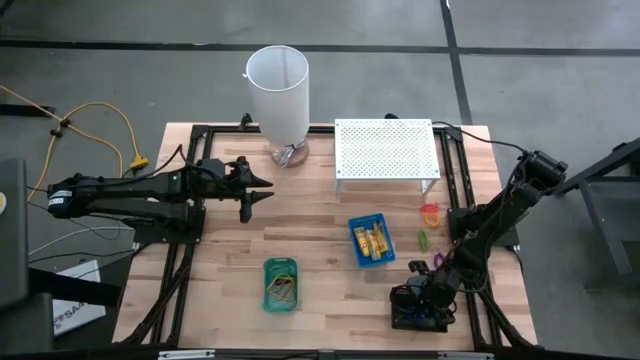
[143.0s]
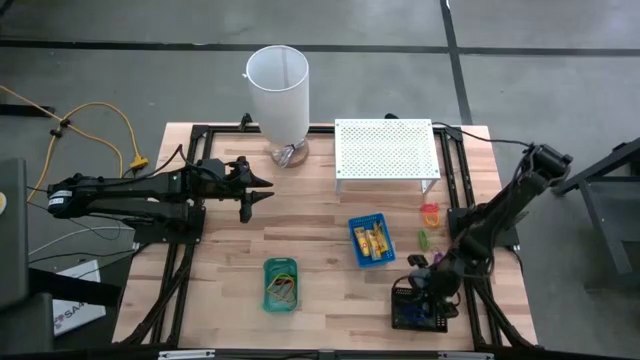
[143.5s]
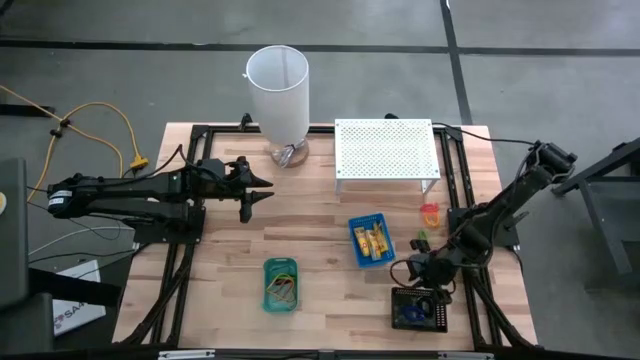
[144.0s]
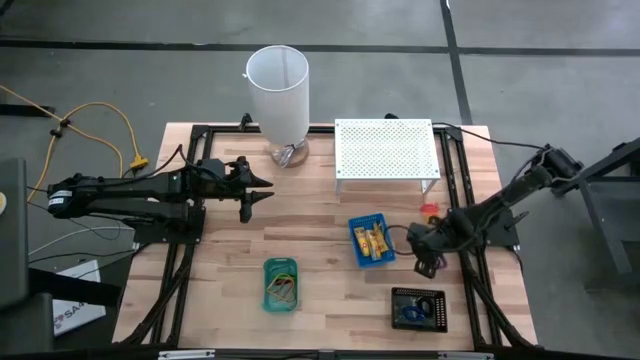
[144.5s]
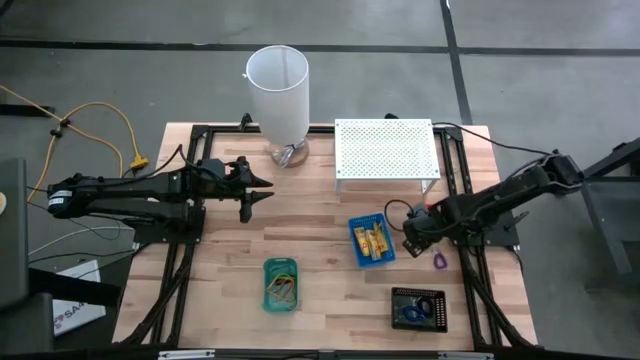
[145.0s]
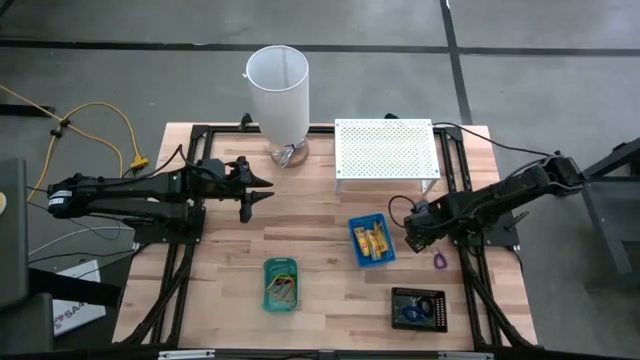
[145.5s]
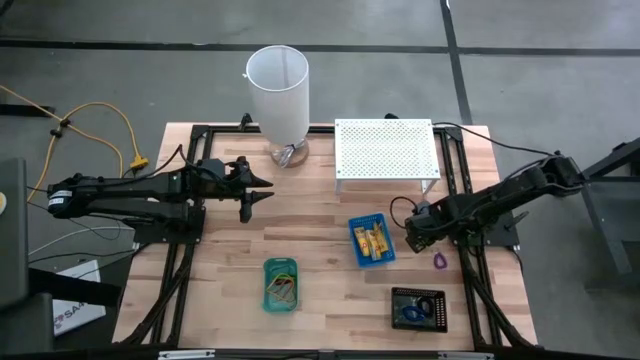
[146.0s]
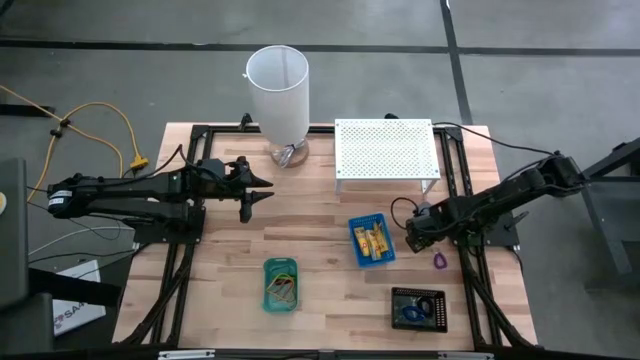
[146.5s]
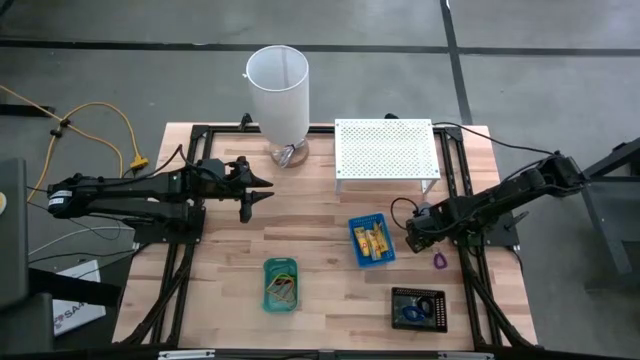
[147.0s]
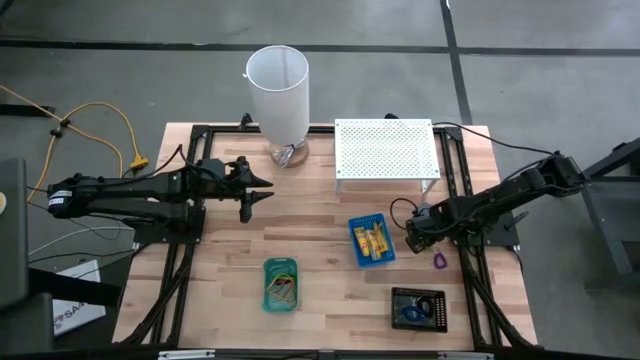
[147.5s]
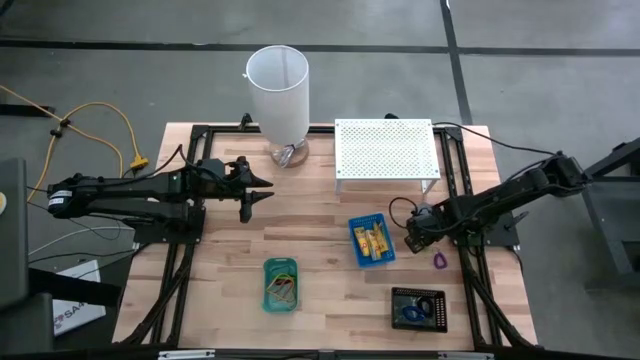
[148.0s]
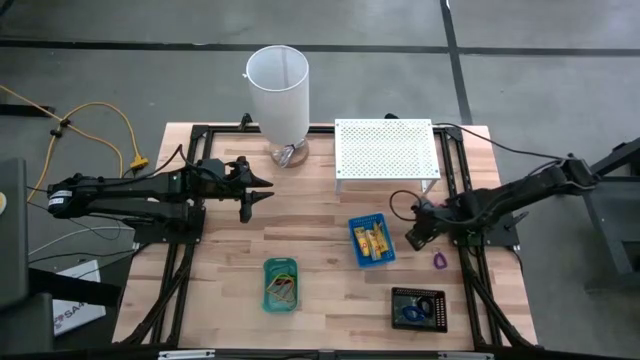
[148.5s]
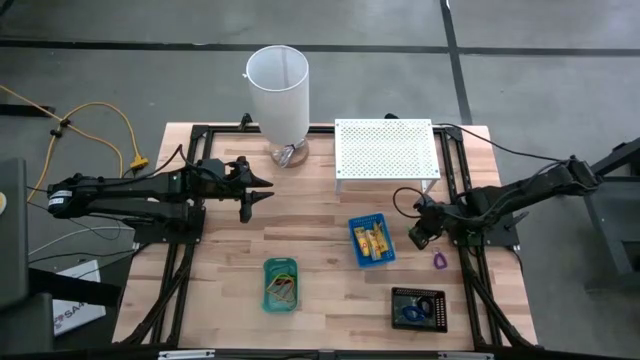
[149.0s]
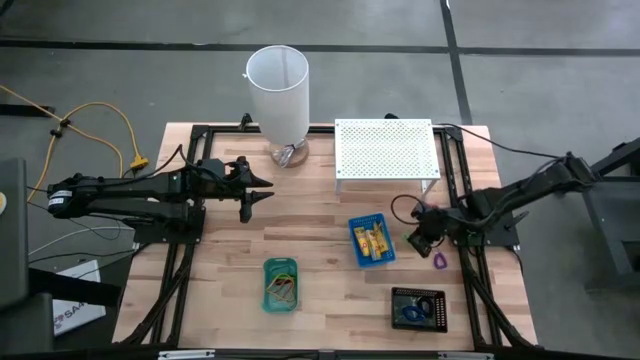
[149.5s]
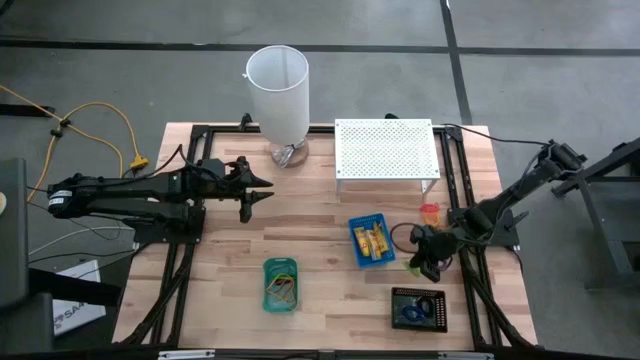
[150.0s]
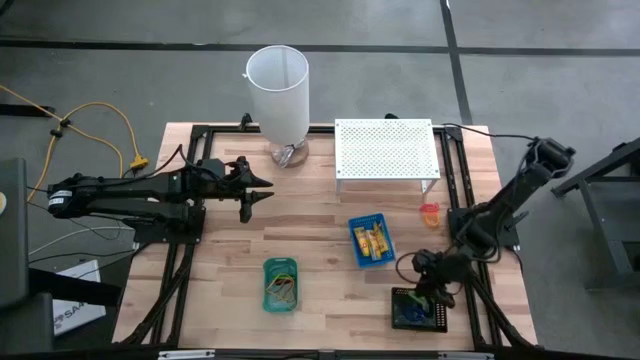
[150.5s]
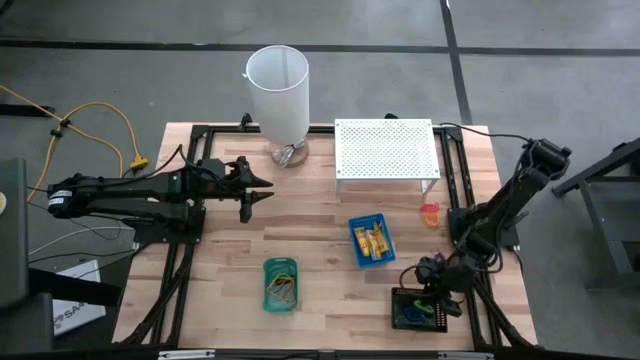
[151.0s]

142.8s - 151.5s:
Task: Pick & Place Office Desk Supplies
Put the green spring rubber band into the black bin

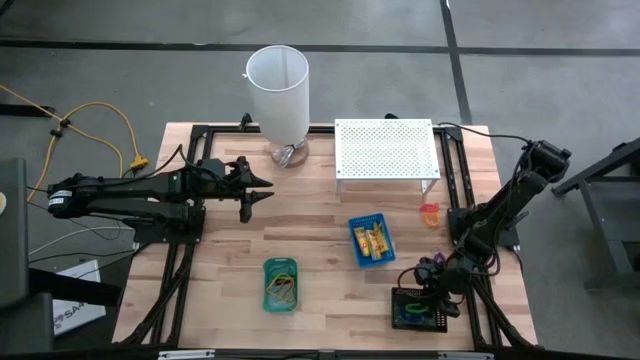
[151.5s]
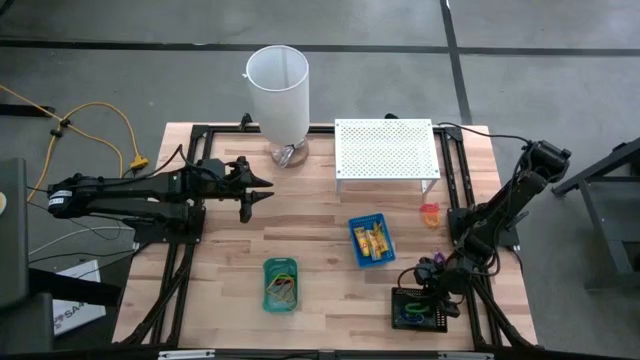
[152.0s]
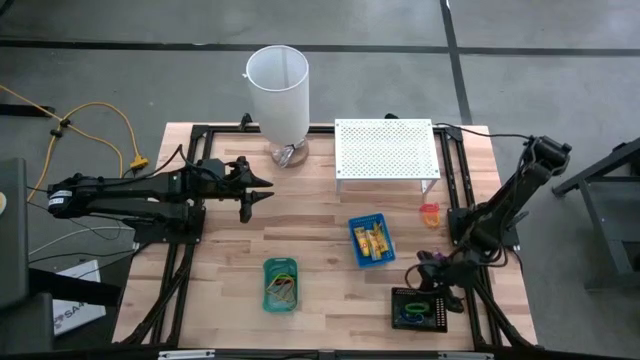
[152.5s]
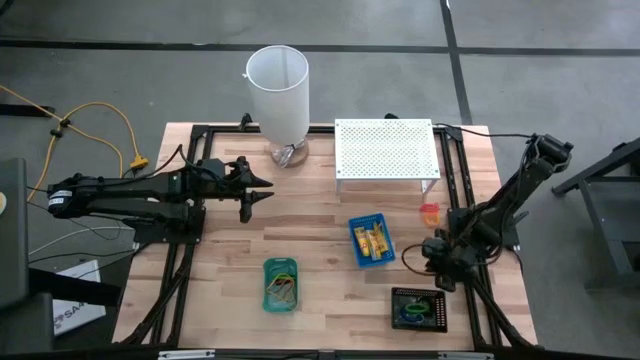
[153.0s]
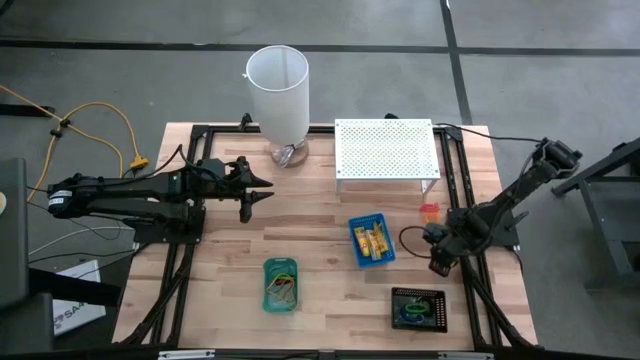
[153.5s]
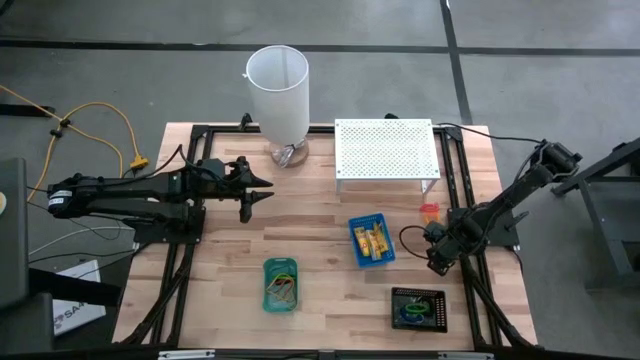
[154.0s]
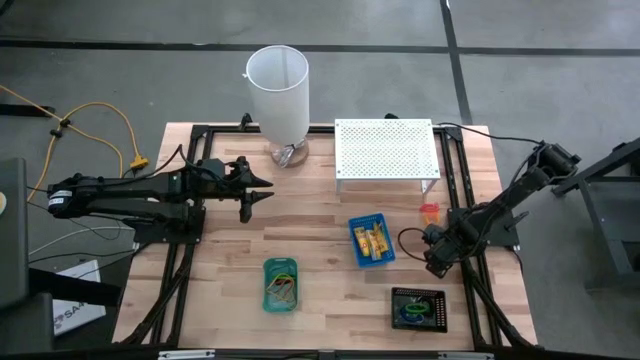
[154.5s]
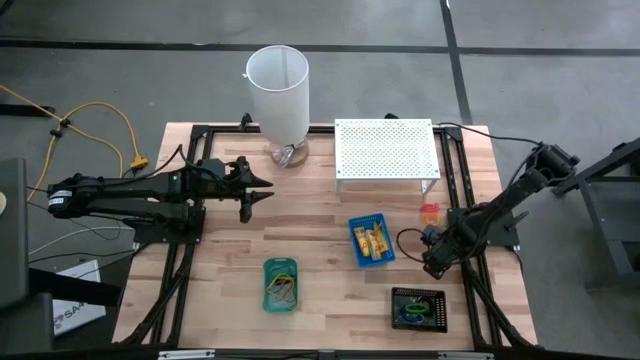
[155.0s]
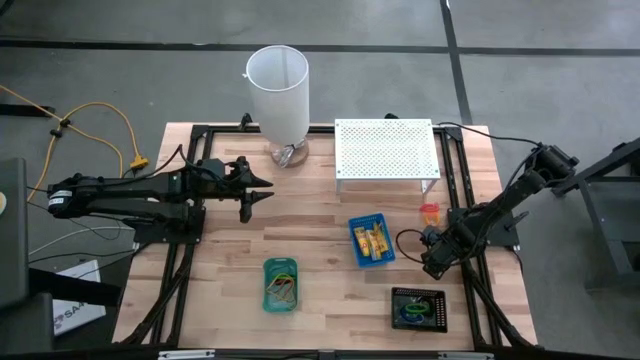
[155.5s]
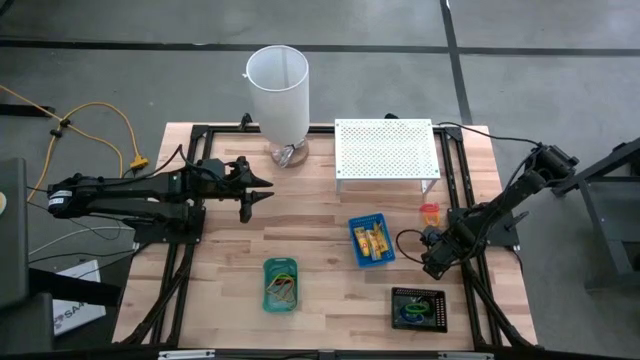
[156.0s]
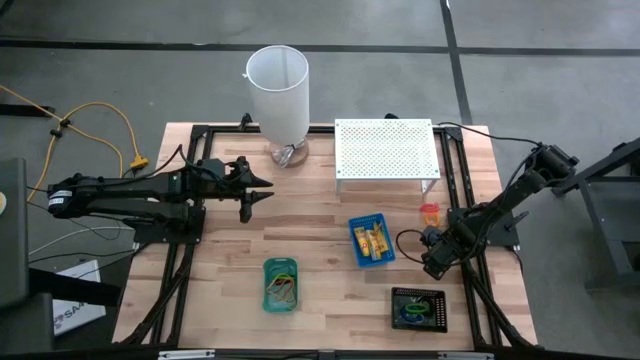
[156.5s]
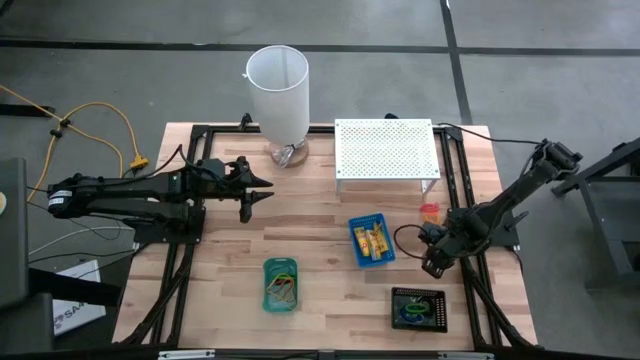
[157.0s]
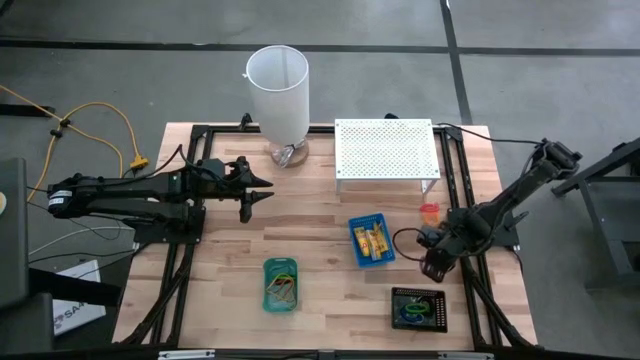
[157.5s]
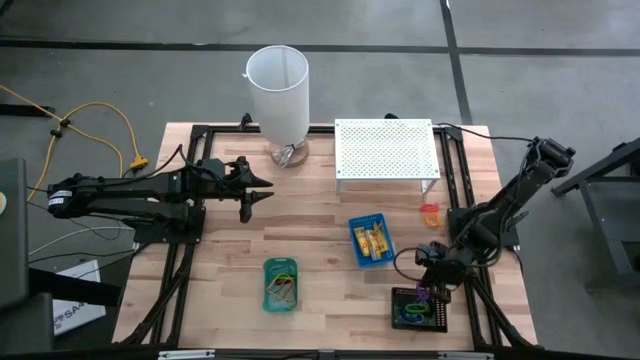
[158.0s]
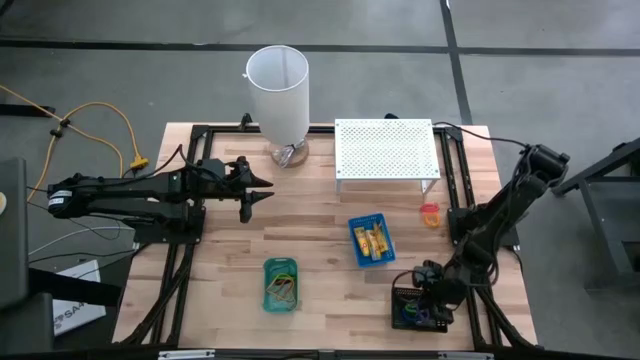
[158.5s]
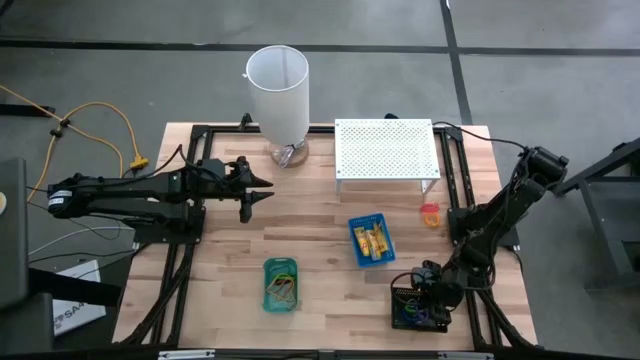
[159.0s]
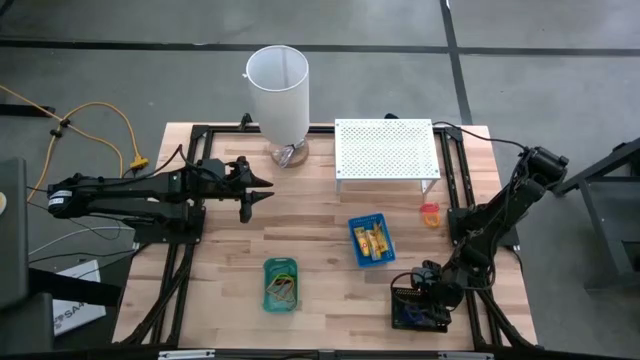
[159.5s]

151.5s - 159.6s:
Put the violet spring rubber band into the black bin

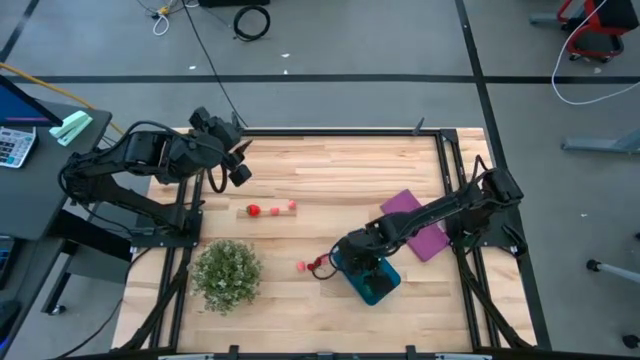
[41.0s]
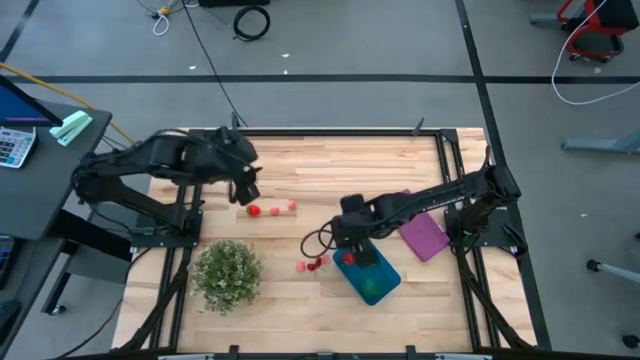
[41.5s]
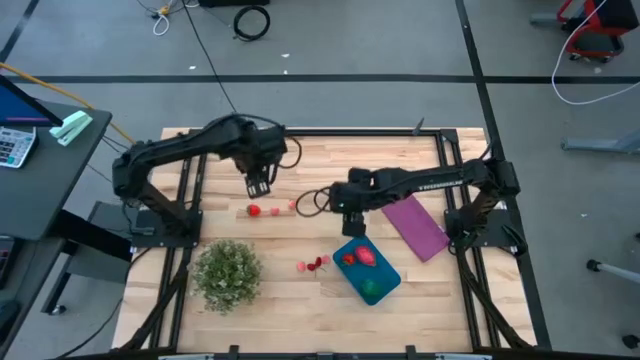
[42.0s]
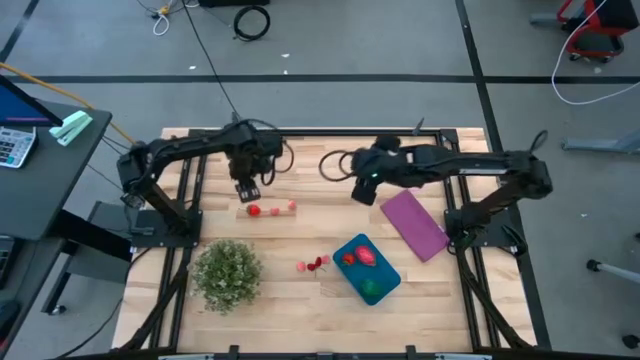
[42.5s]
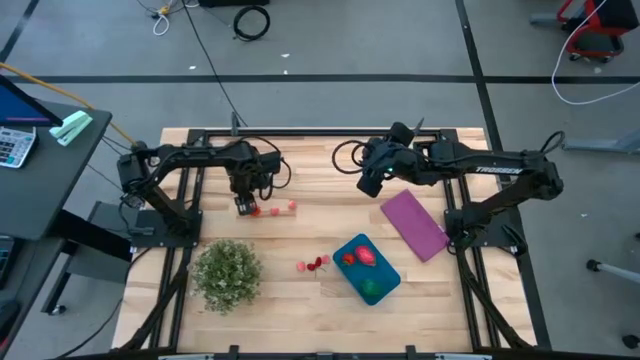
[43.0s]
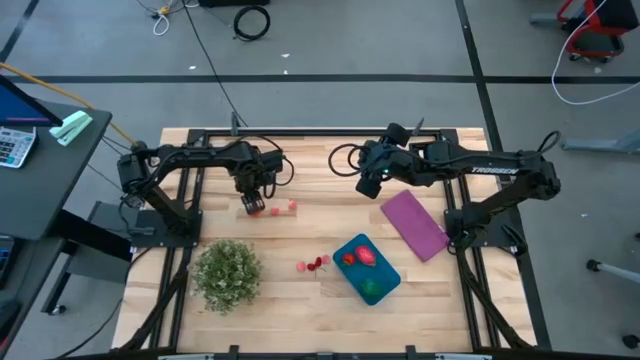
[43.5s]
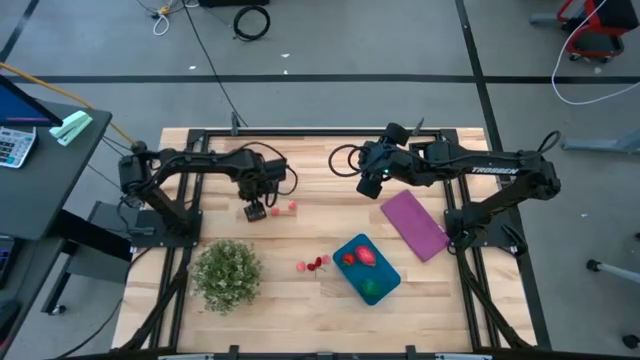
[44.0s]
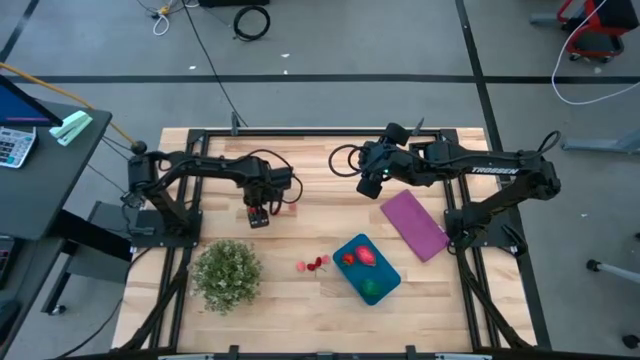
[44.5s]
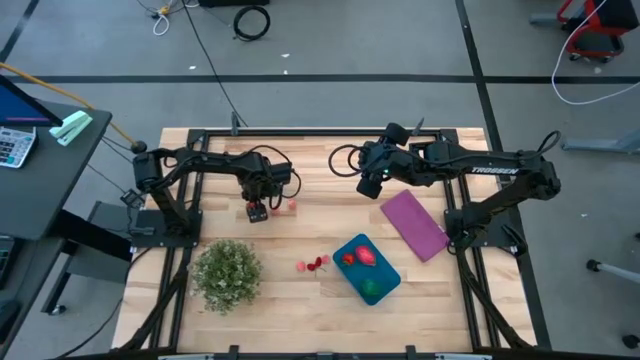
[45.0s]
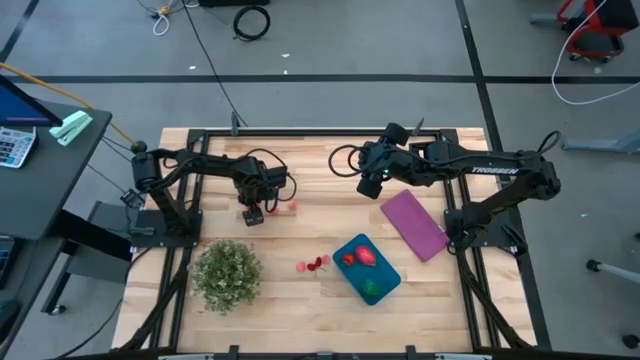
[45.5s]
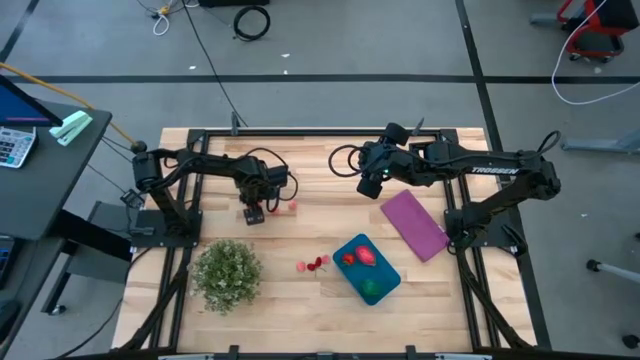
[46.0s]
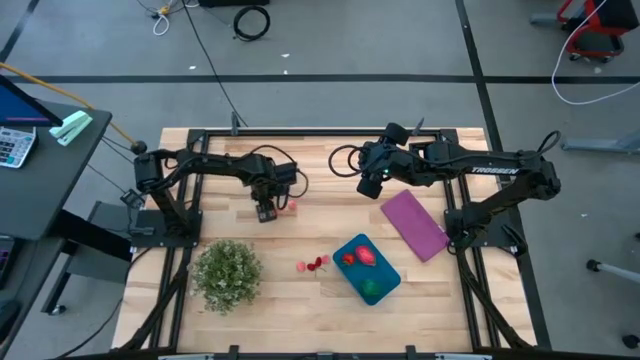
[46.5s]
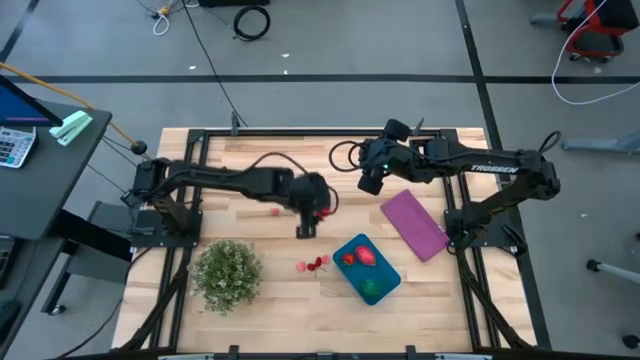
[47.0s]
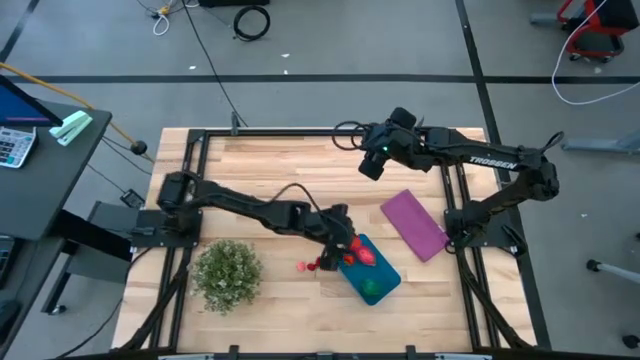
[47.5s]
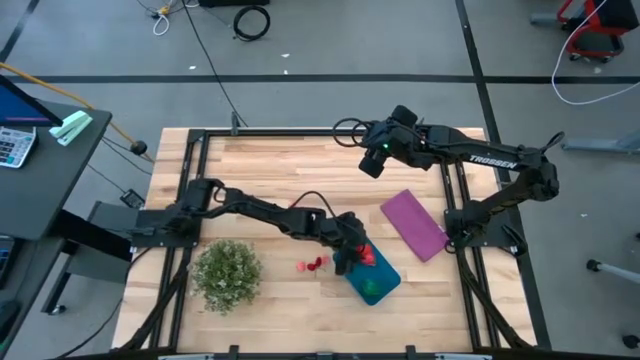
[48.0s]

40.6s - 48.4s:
Task: Pick and placing Produce into tupperware
Put the red strawberry into the blue bin
